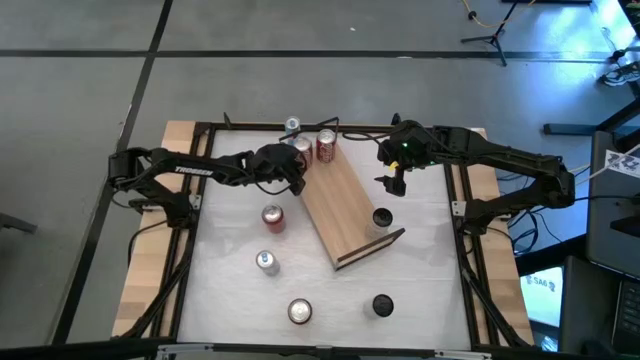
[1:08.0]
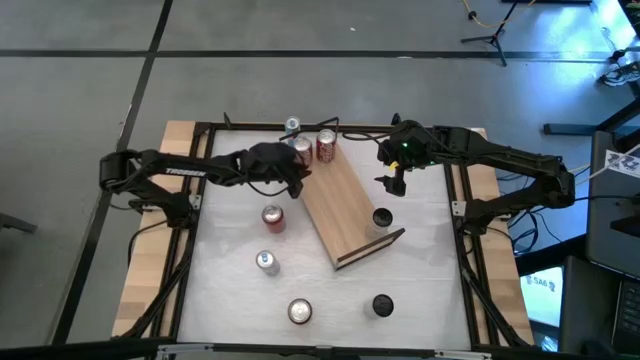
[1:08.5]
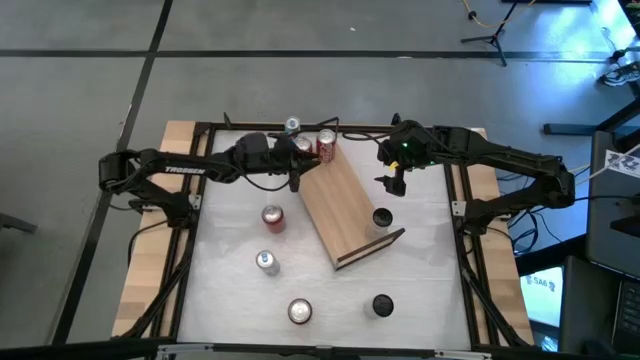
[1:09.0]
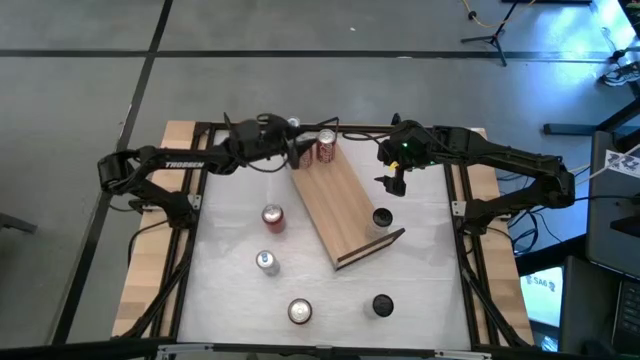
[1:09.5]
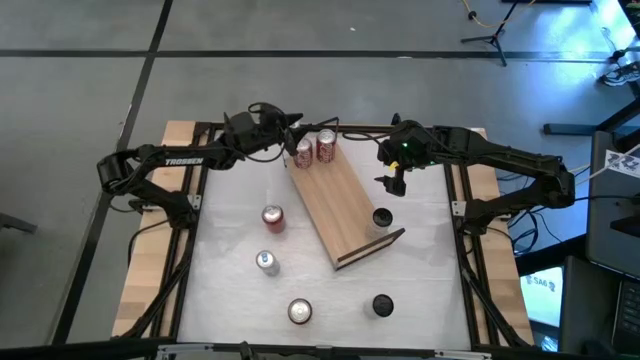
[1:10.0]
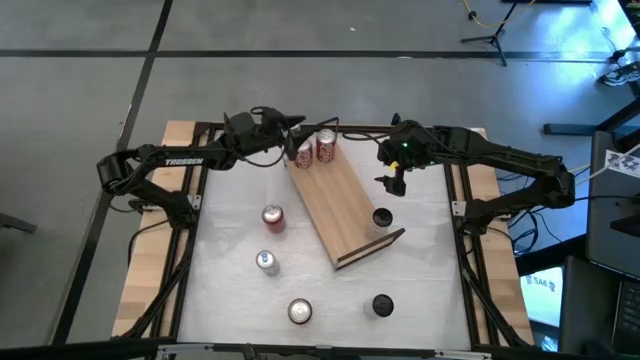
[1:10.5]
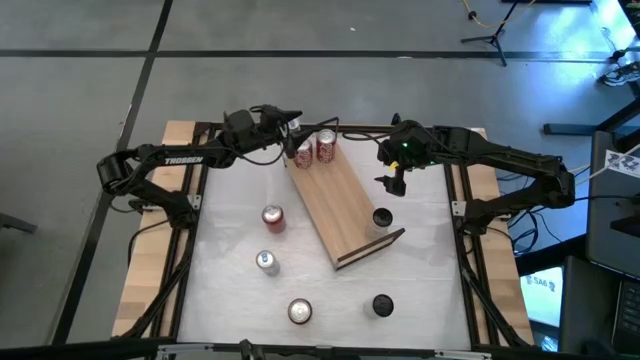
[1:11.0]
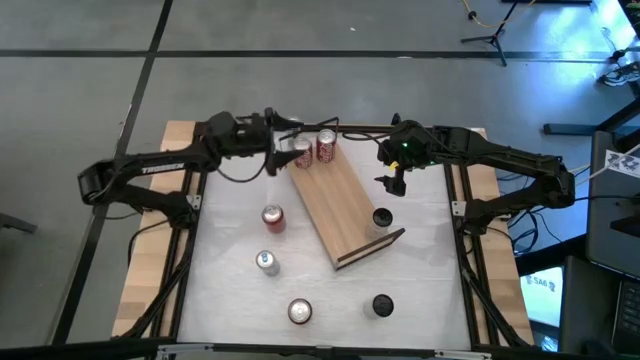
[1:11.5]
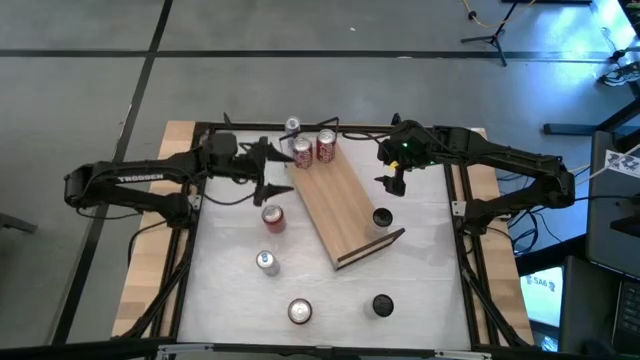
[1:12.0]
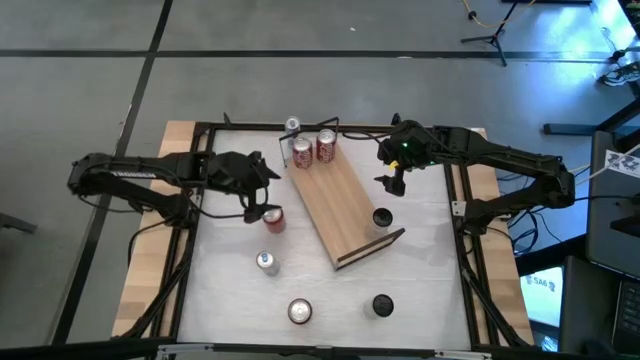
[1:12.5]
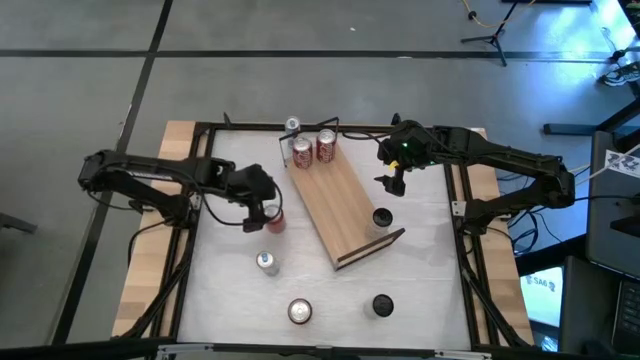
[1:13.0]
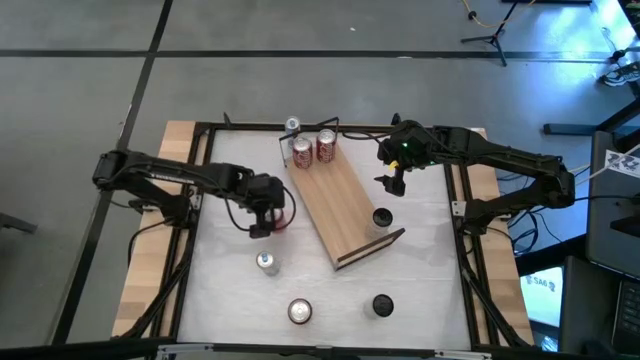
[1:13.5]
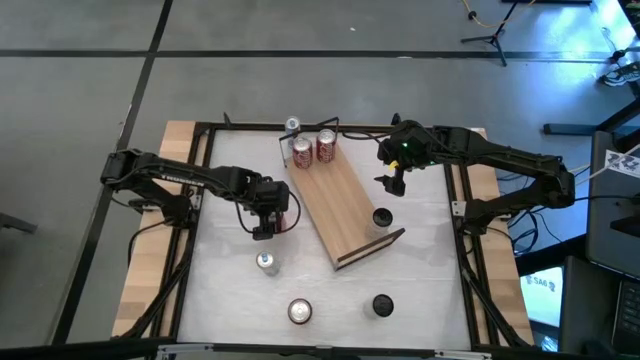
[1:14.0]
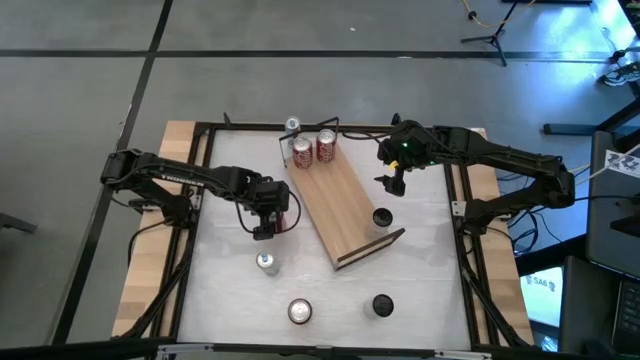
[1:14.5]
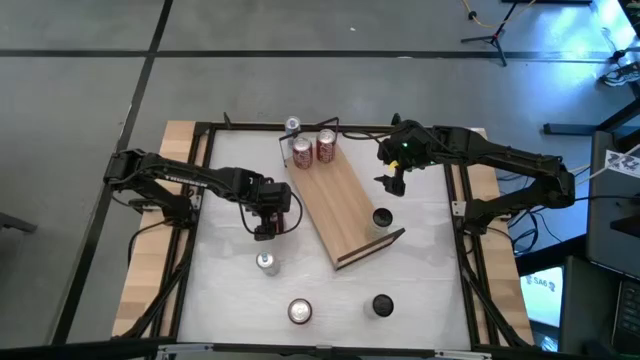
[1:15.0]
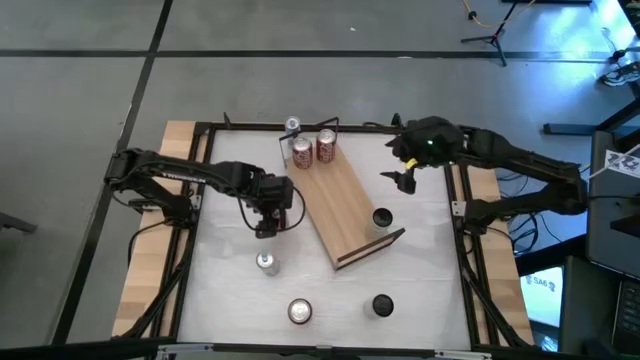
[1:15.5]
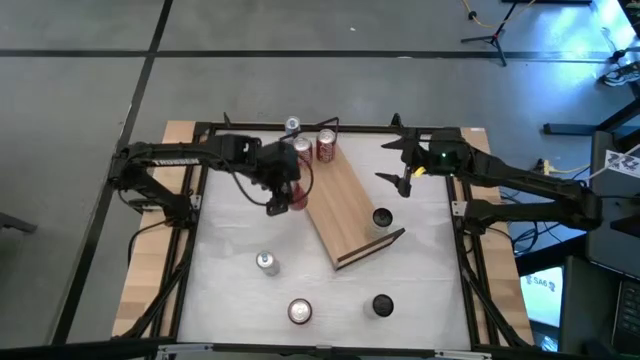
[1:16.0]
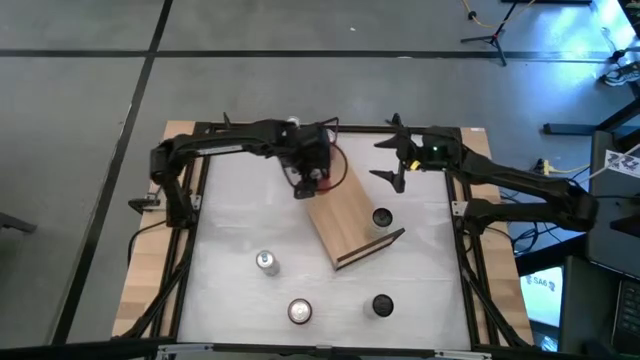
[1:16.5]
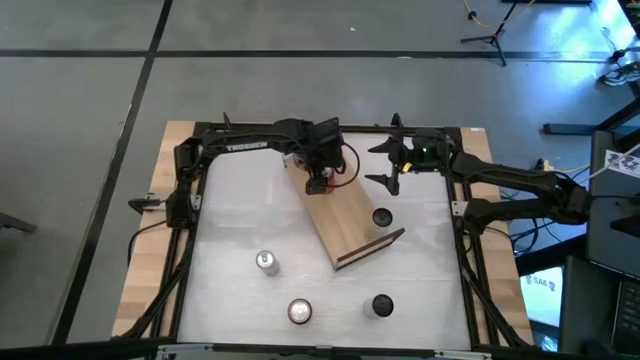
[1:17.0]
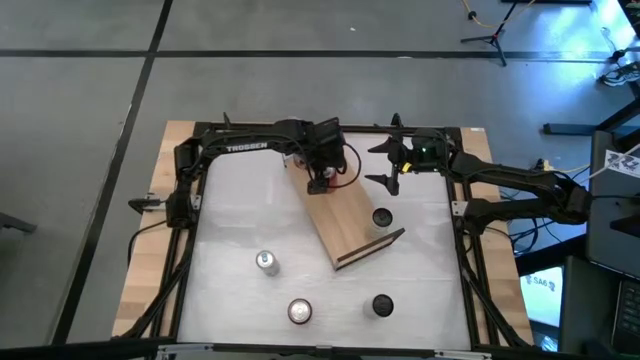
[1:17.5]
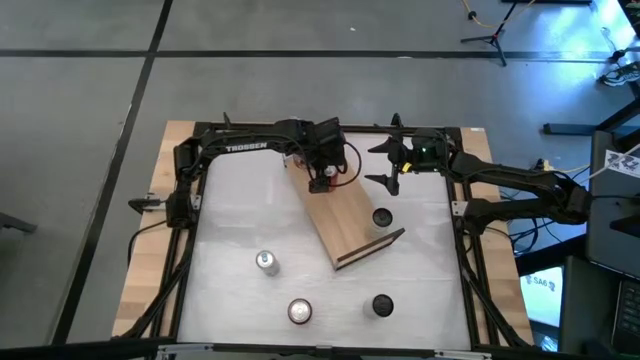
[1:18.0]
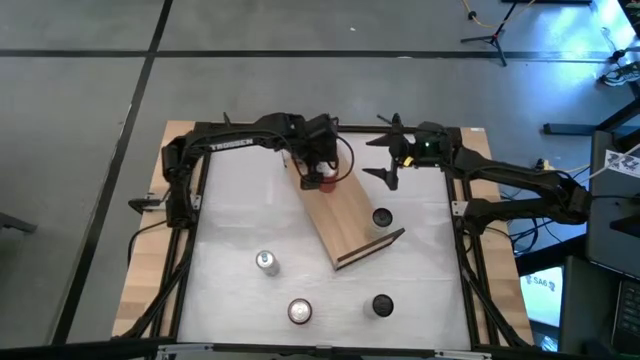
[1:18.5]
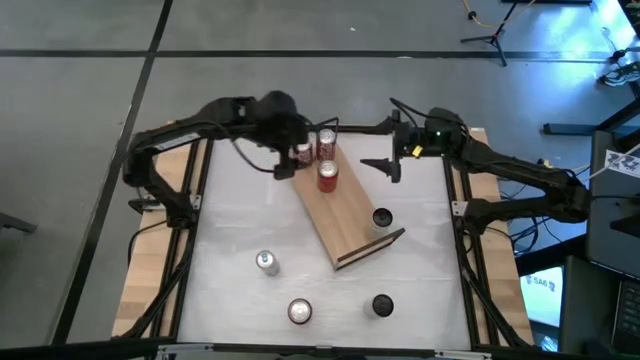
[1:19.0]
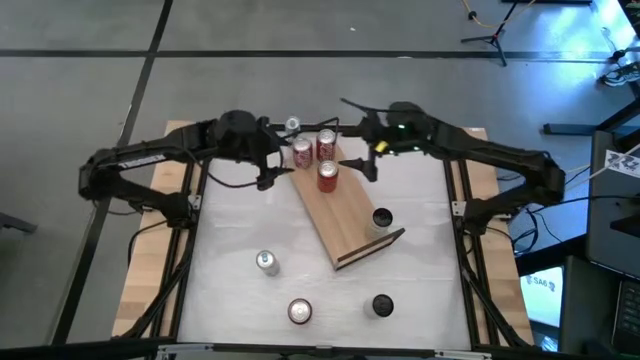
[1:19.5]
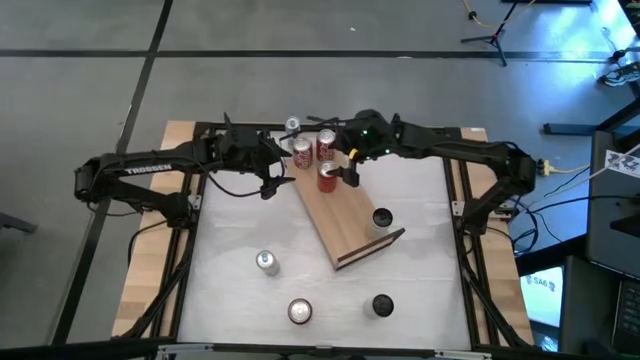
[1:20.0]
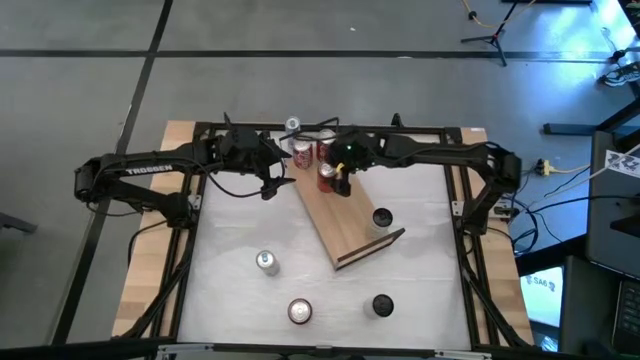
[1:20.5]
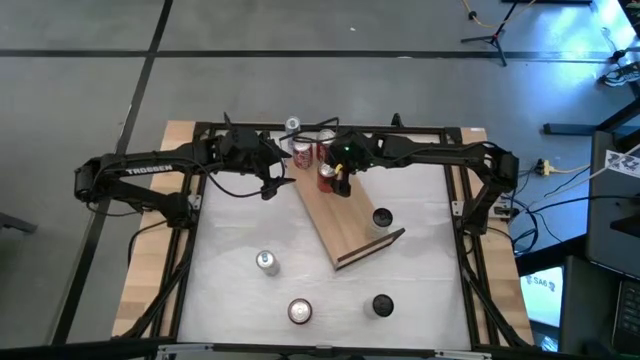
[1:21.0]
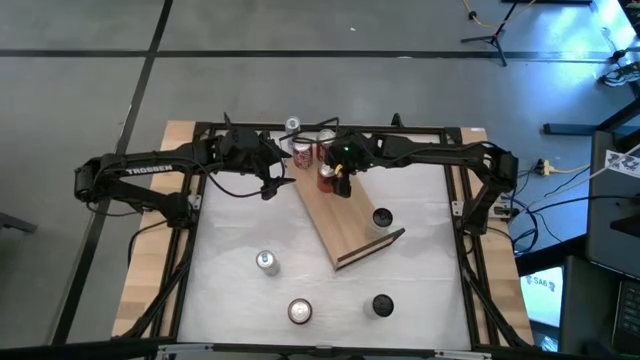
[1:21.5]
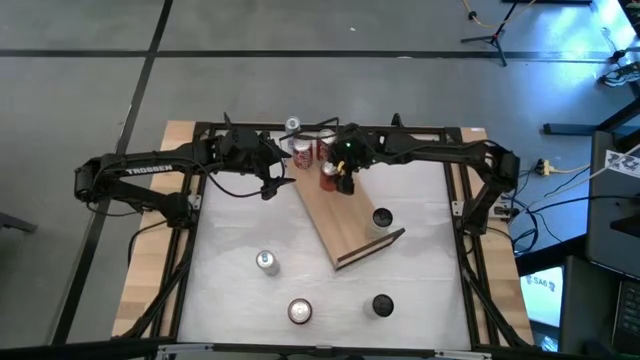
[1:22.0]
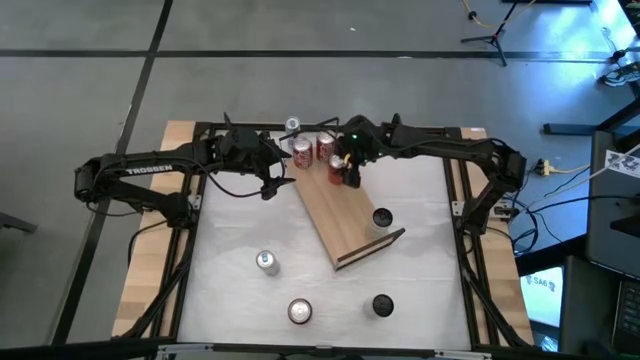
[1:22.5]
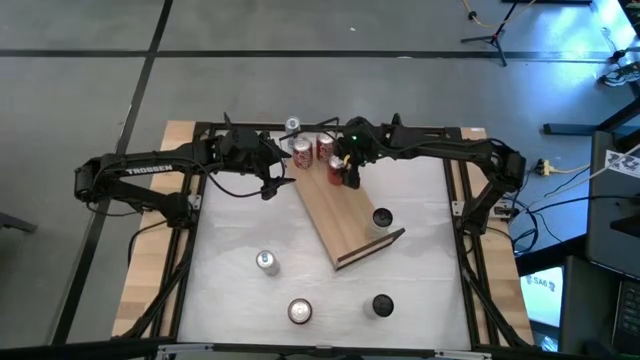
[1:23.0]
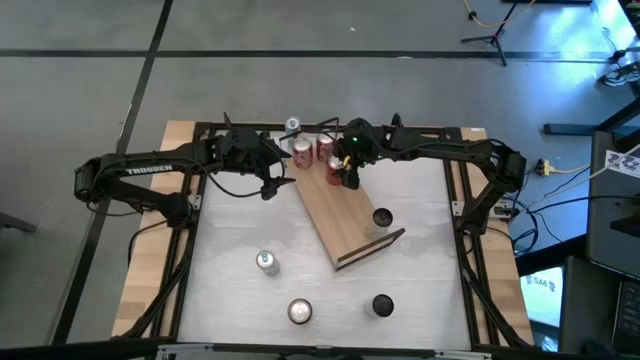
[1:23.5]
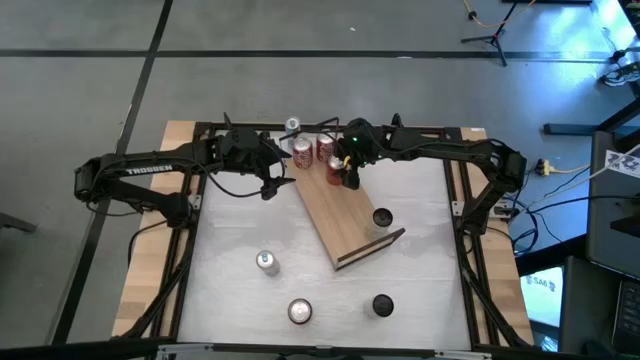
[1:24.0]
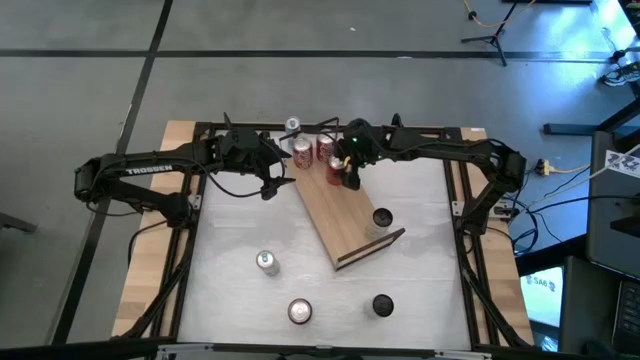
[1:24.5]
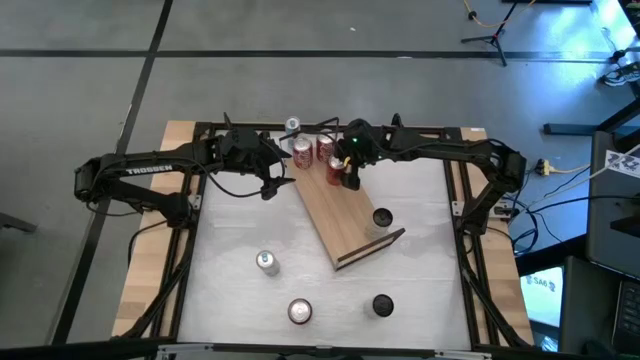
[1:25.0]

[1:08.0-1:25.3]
Task: Place canned beverage on shelf
Put the top red black soda can on the shelf

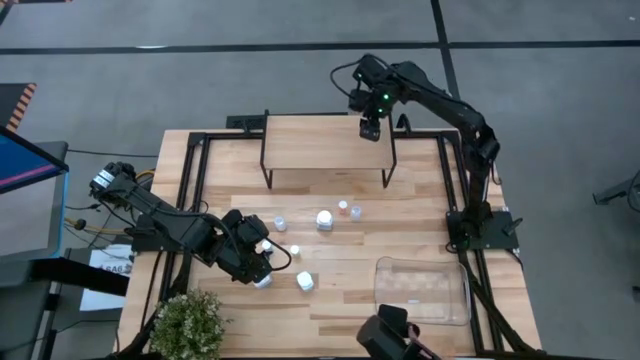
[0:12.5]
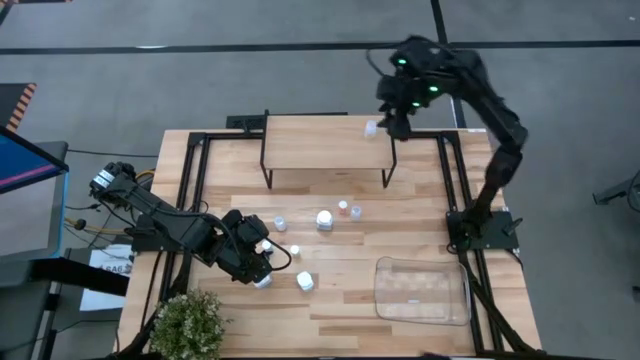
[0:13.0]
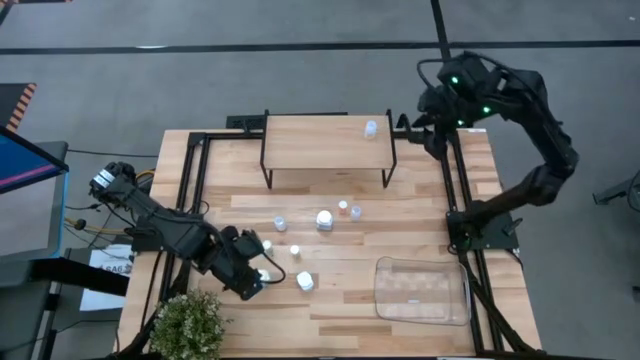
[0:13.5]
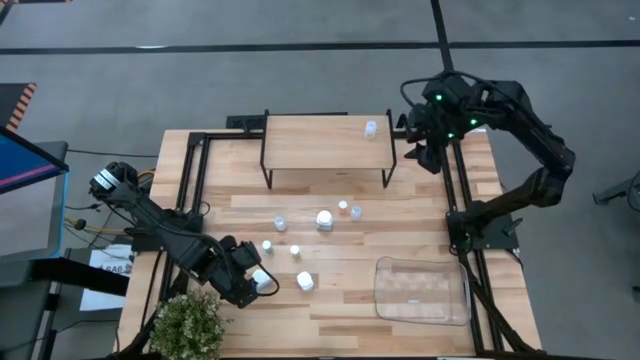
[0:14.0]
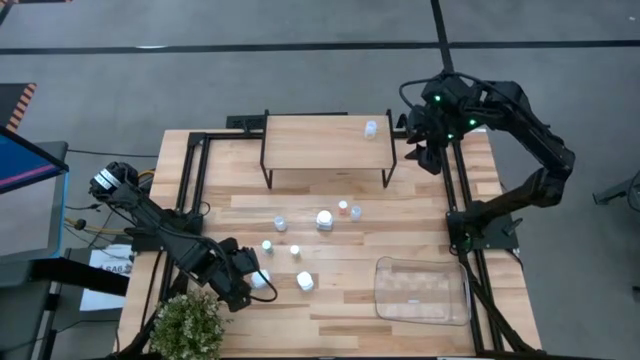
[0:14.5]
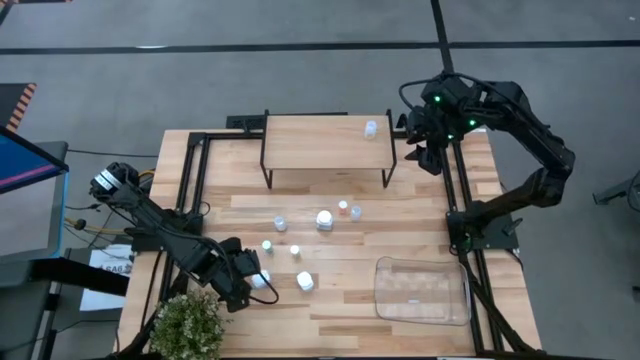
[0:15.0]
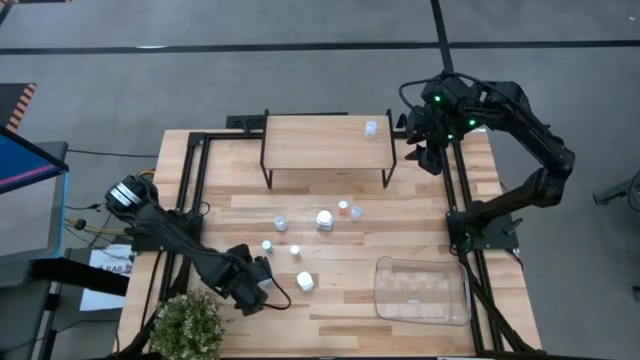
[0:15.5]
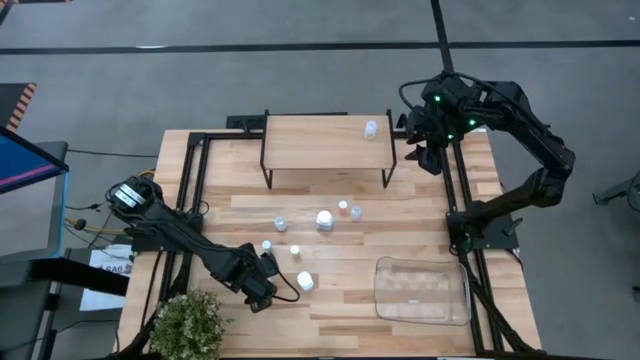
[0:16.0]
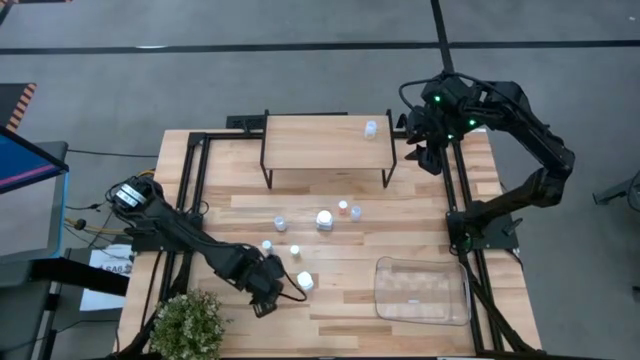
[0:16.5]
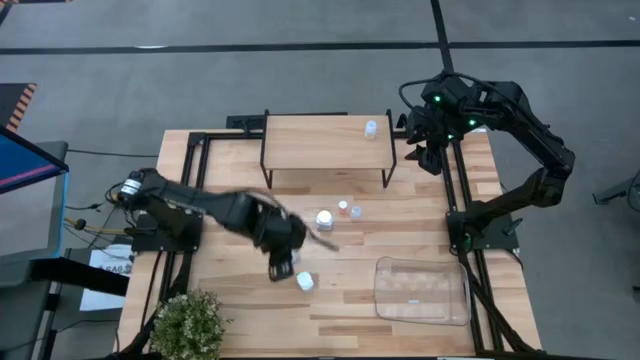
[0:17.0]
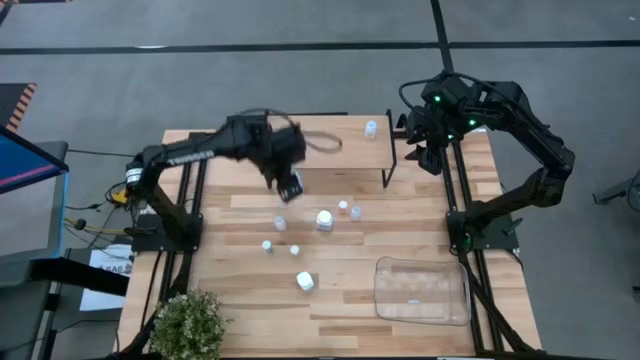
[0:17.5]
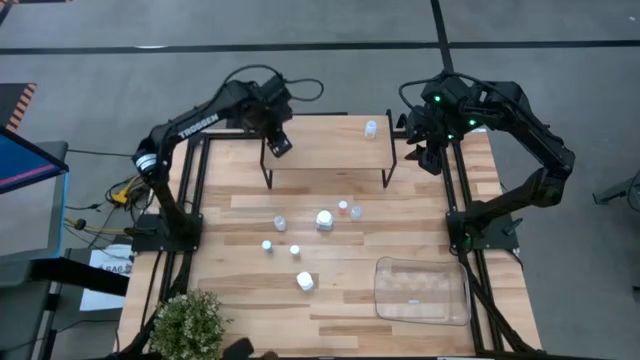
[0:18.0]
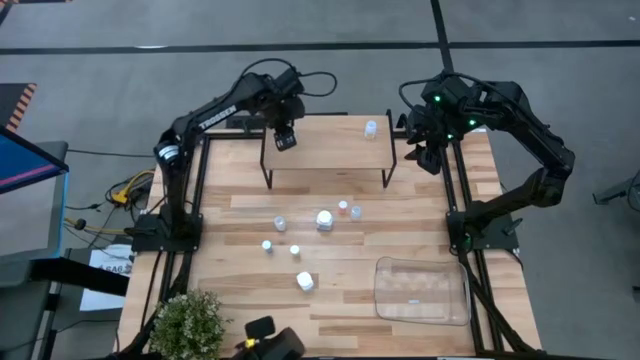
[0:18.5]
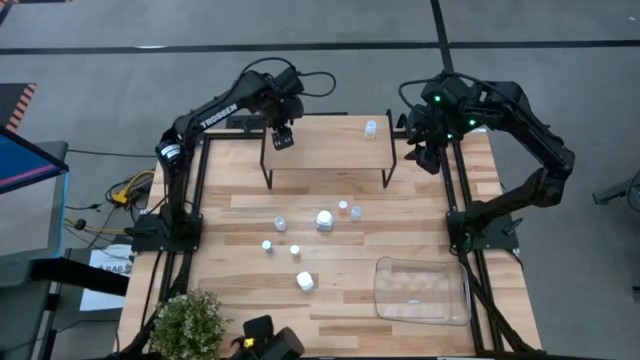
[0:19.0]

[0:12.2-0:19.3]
Task: Pick and place medicine bottles onto shelf by color
Put the bottom left big white pill bottle on the shelf
